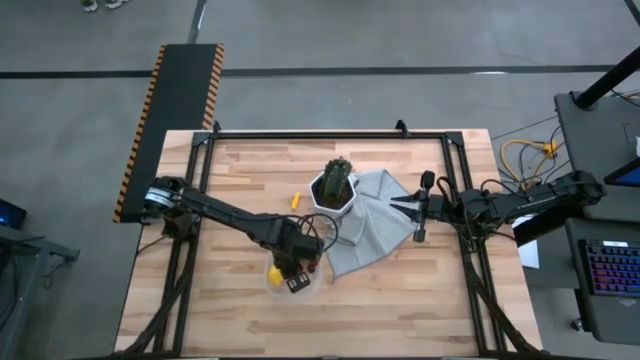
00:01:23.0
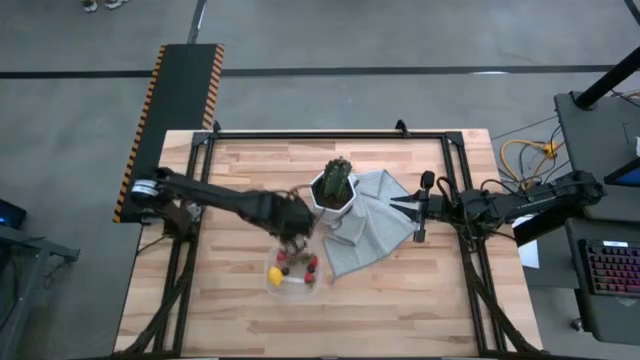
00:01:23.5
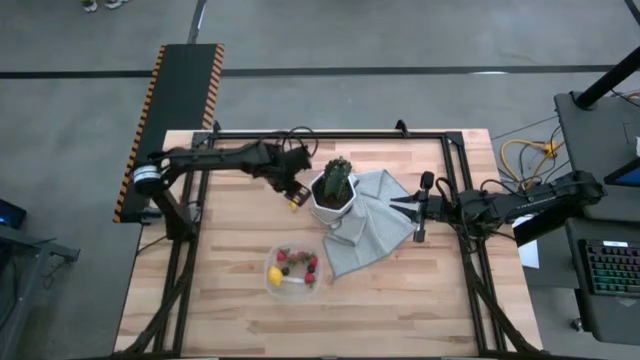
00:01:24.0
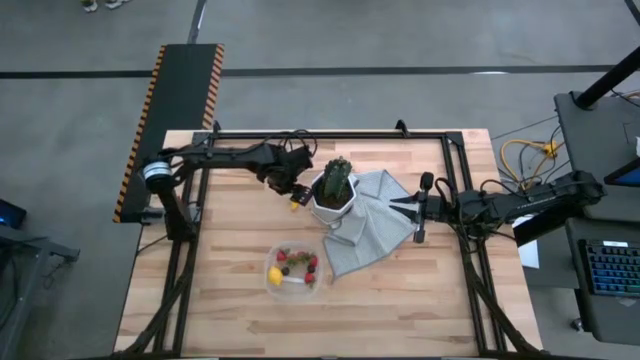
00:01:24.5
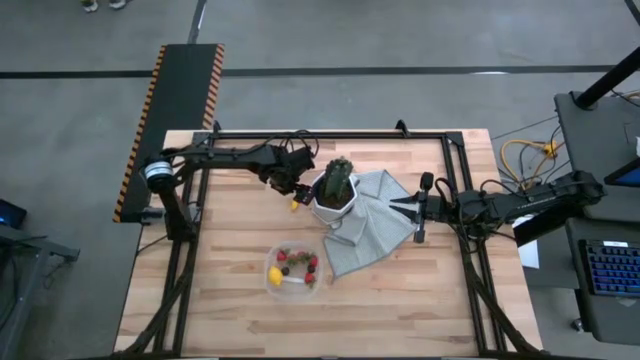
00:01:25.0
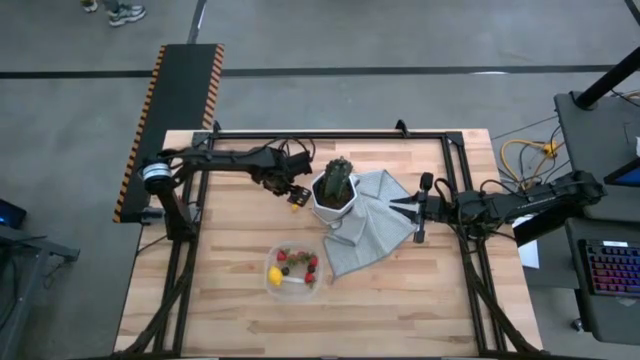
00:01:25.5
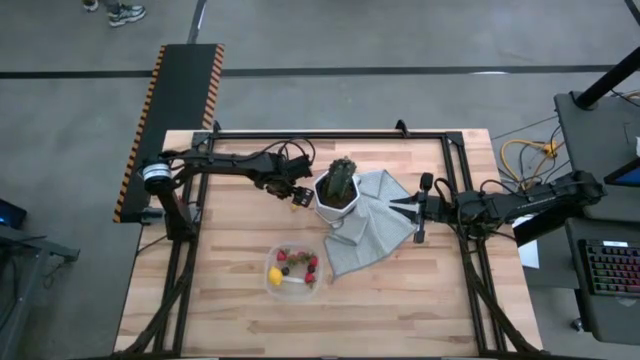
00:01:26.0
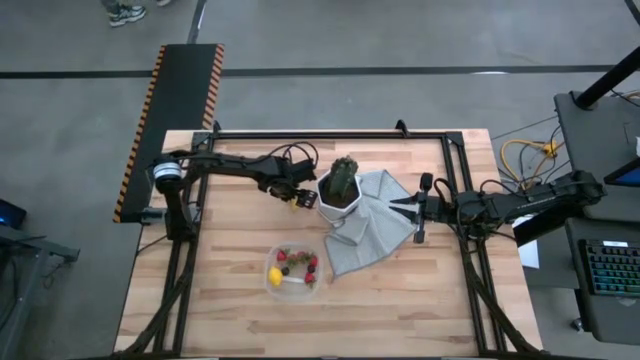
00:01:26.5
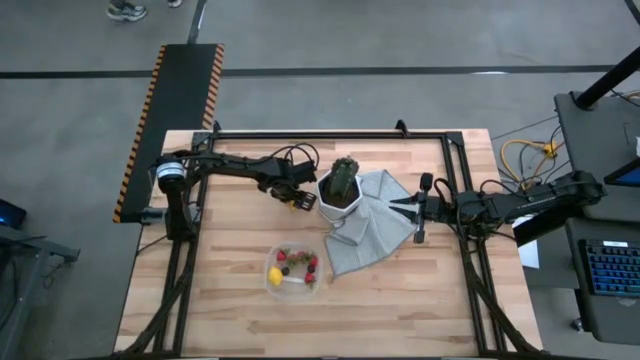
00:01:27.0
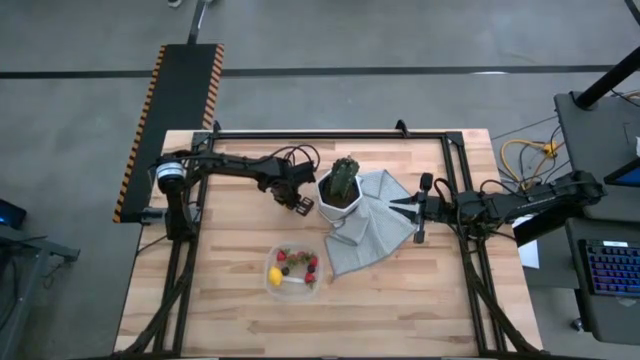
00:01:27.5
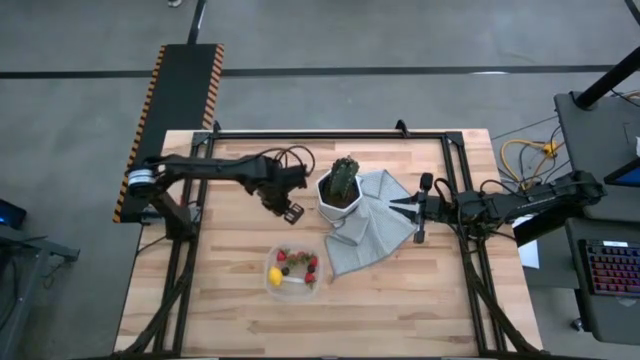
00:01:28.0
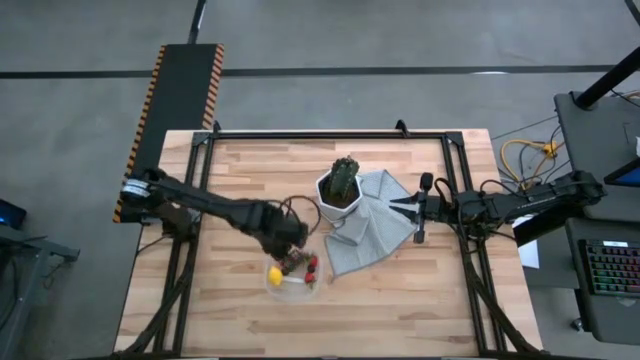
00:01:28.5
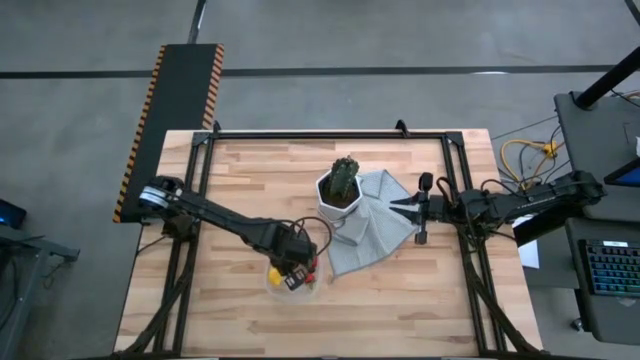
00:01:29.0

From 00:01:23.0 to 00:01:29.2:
Task: Pick and placing Produce into tupperware
Put the corn into the transparent plastic container

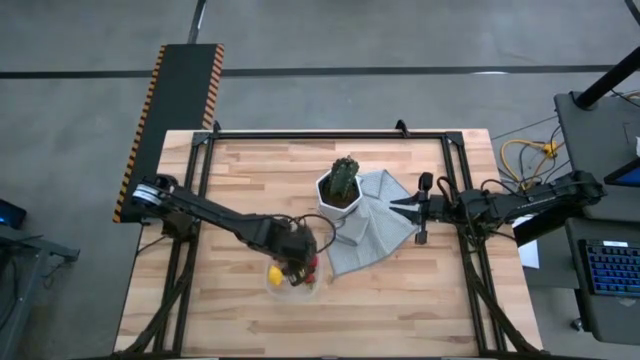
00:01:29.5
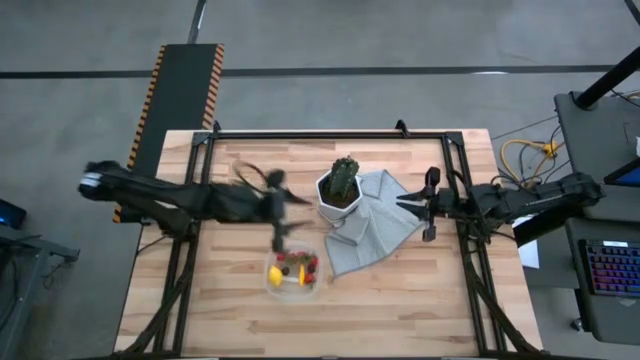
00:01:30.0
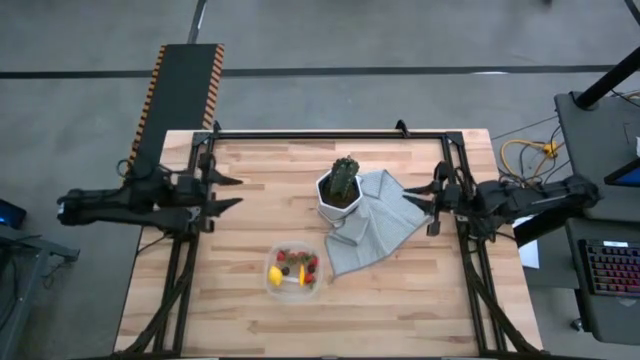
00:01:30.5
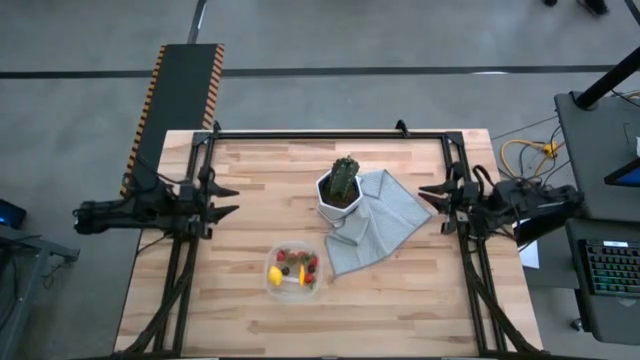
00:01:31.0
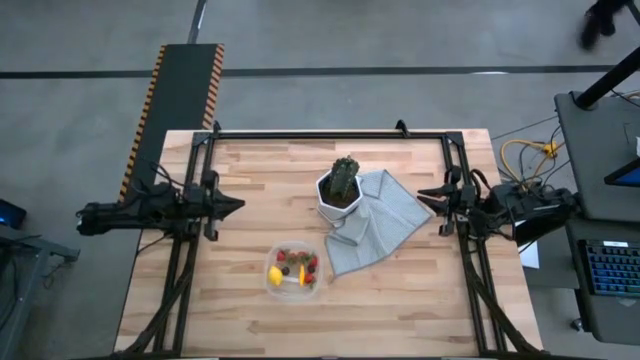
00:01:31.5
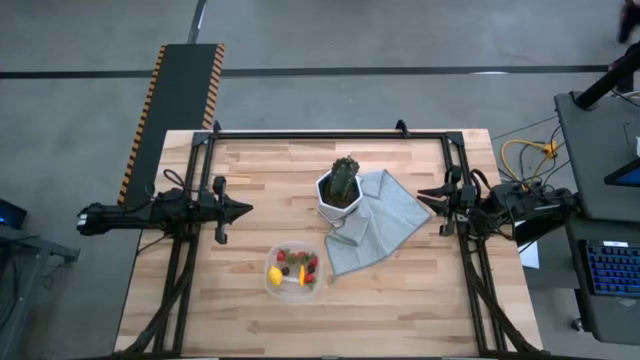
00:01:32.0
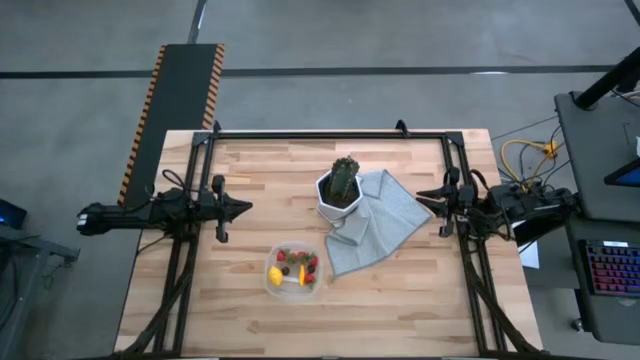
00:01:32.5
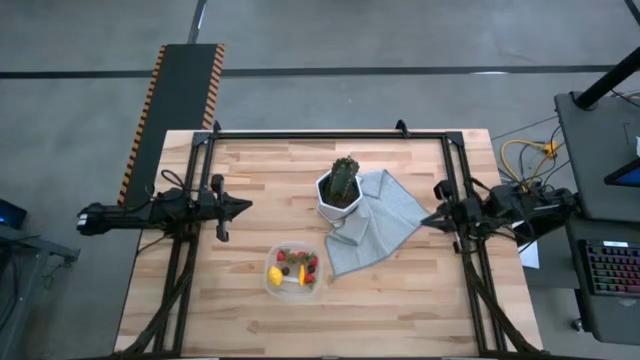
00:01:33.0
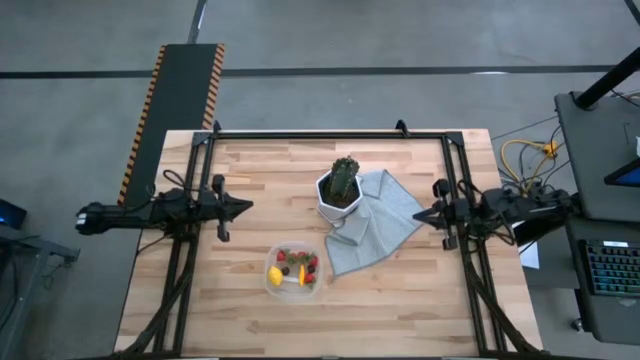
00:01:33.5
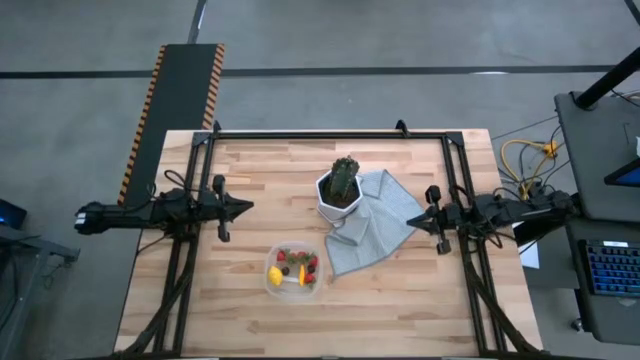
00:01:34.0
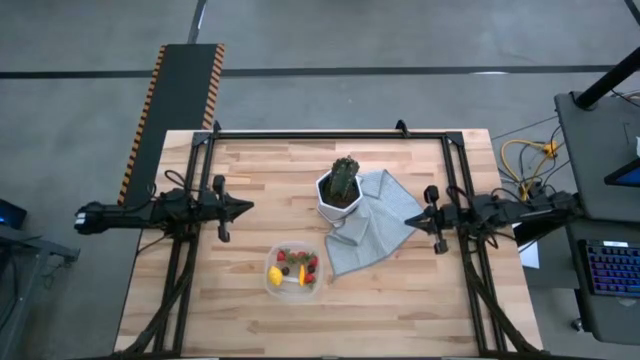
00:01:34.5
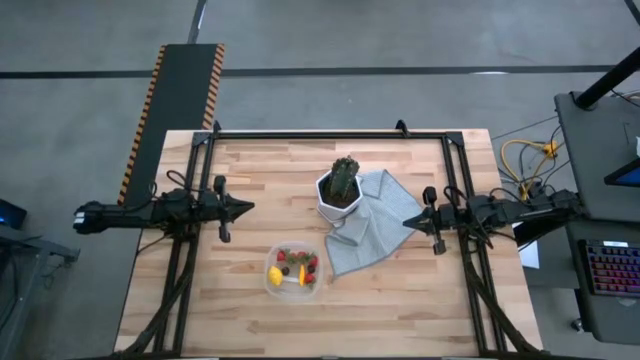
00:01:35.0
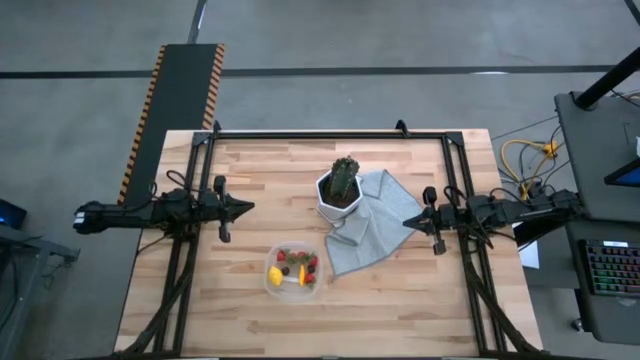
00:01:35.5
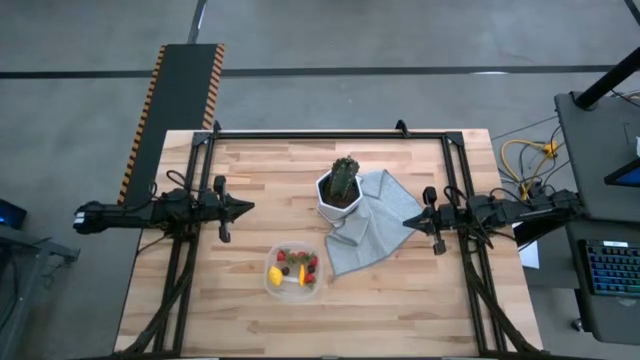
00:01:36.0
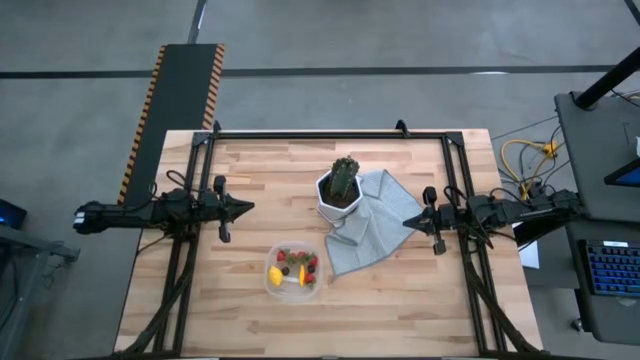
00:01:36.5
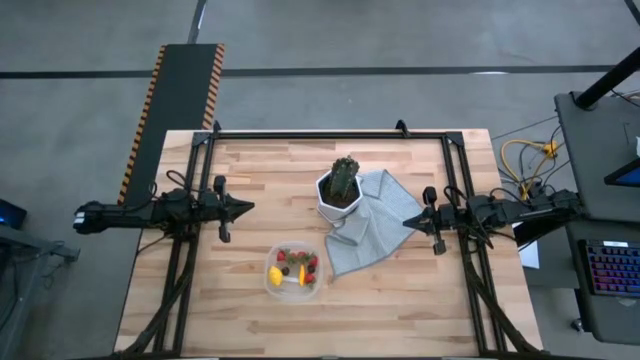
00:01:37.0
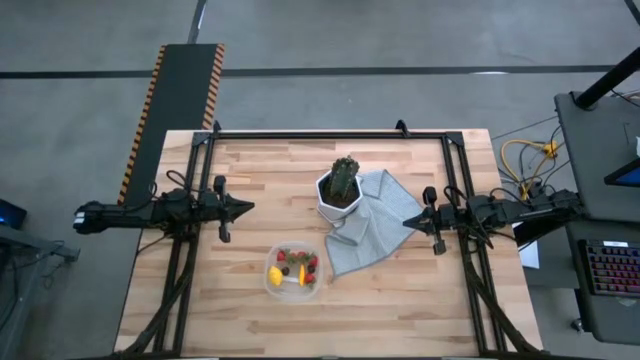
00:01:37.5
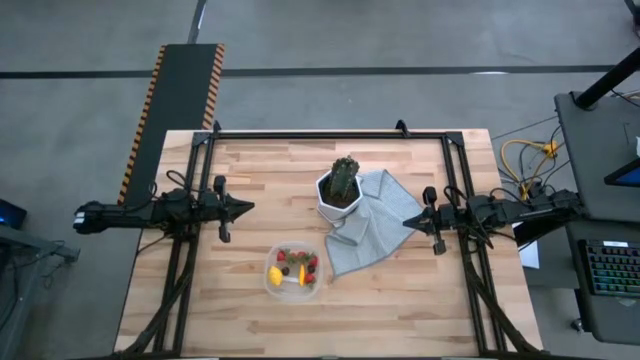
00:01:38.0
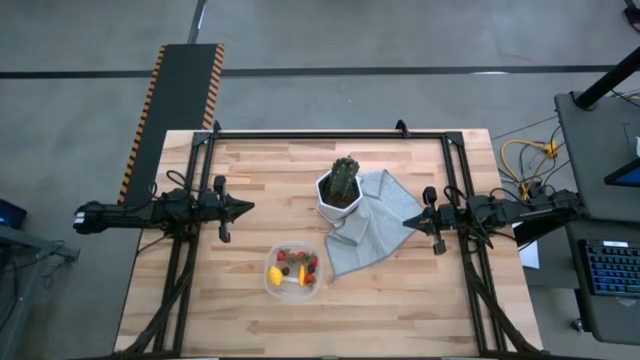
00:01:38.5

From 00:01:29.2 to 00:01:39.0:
Return to Home position

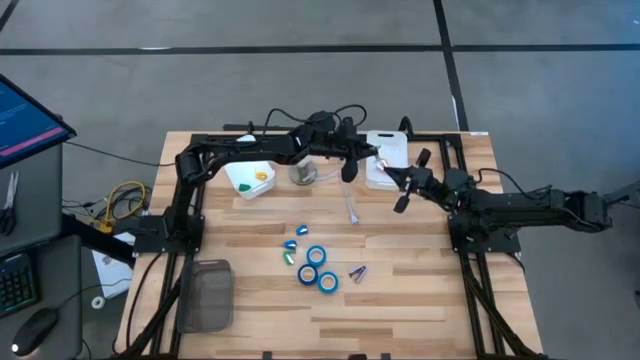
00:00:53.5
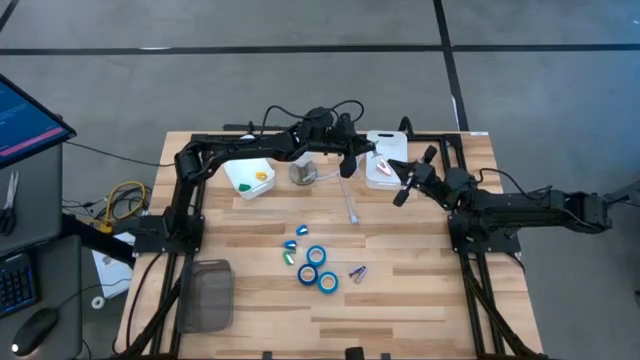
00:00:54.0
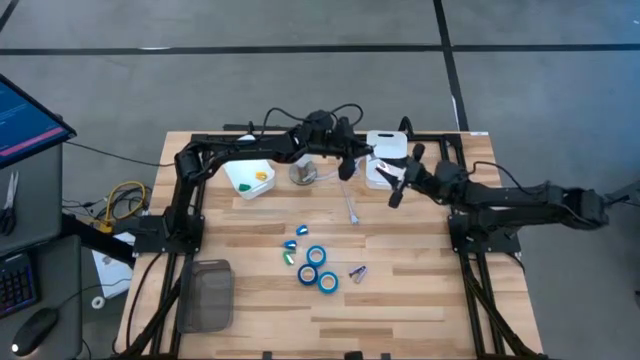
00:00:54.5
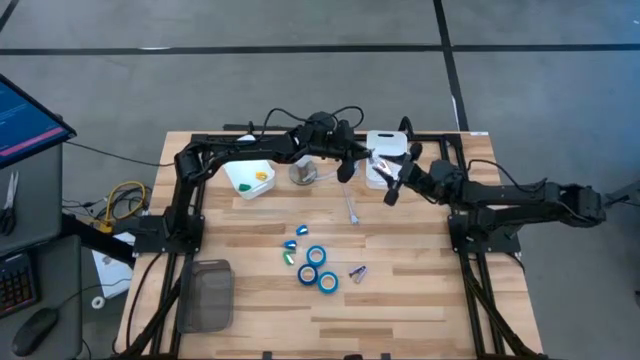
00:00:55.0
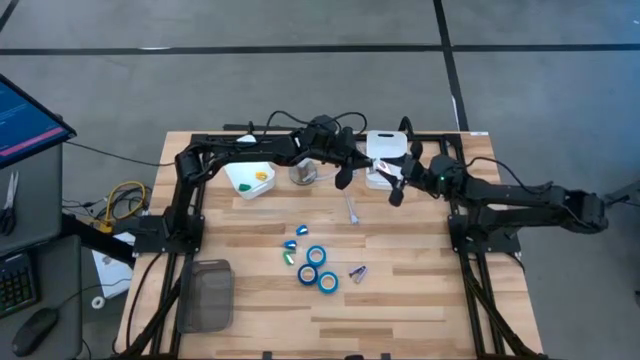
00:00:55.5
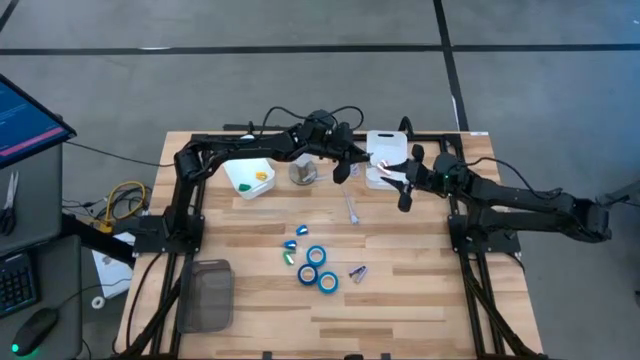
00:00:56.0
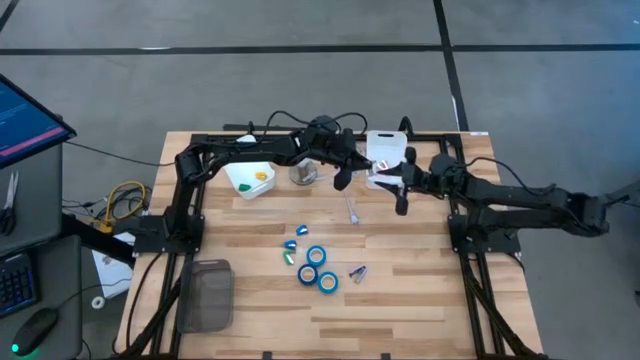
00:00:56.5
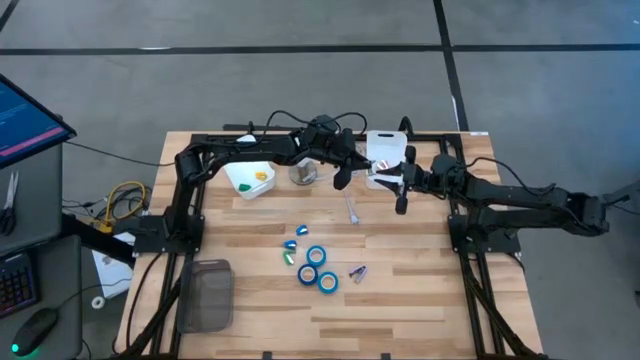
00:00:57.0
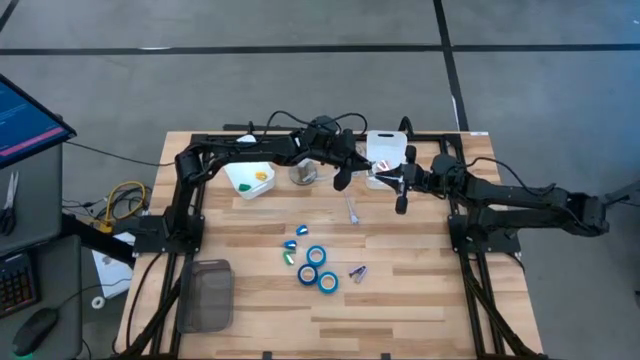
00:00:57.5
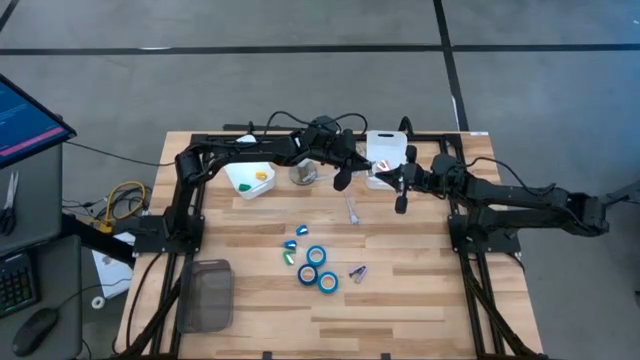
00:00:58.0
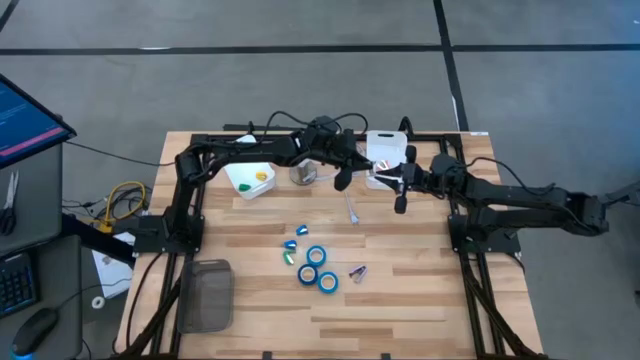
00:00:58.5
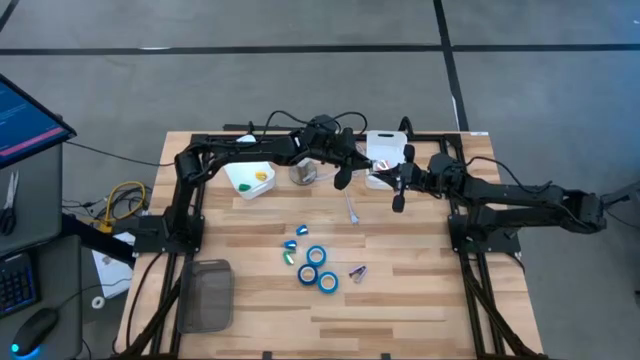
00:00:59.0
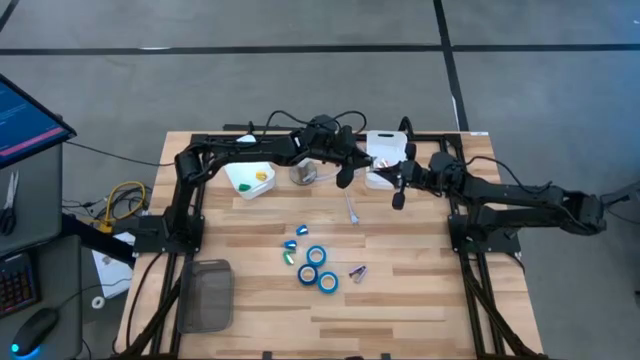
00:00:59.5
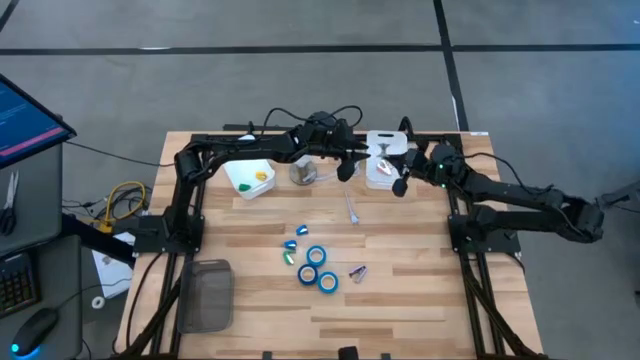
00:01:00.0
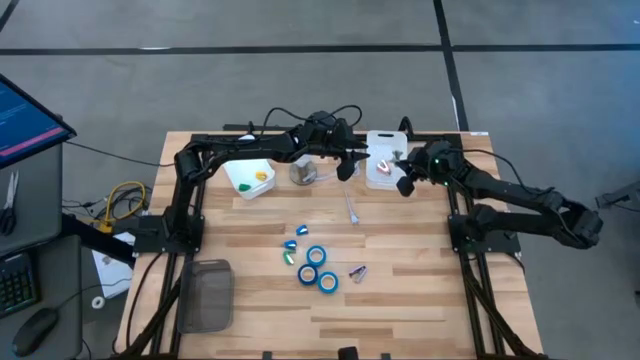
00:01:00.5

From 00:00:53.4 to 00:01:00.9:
Task: Pick and place Stapler, Stapler remover, tape
Put the gray staple remover into the right white bin
